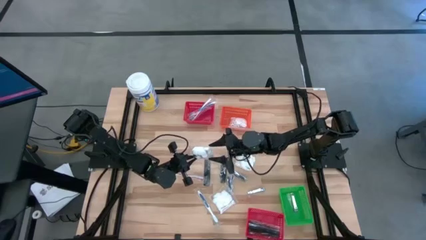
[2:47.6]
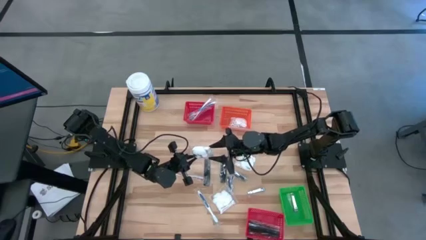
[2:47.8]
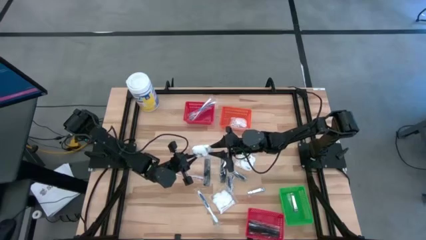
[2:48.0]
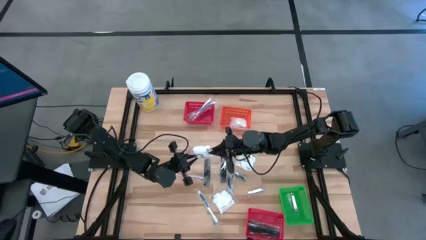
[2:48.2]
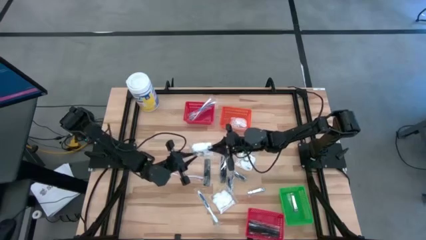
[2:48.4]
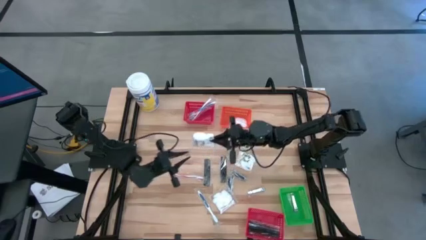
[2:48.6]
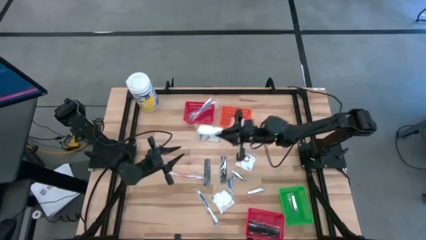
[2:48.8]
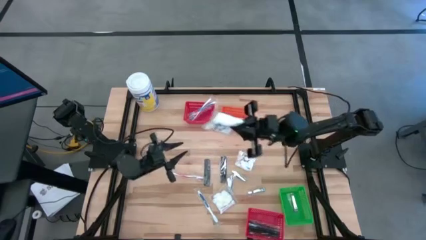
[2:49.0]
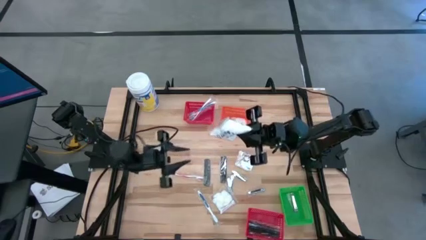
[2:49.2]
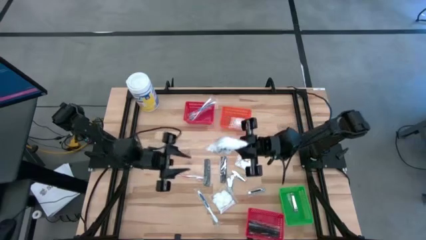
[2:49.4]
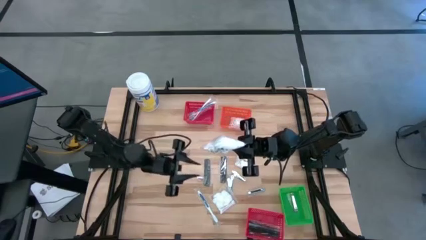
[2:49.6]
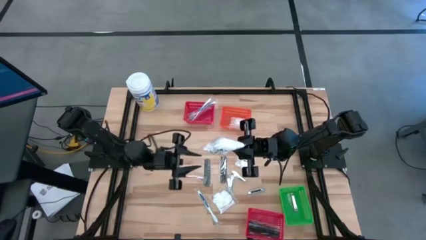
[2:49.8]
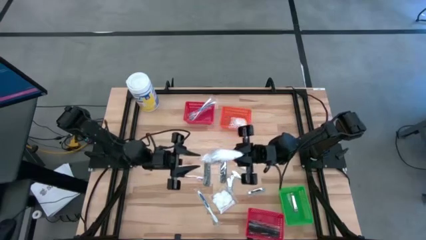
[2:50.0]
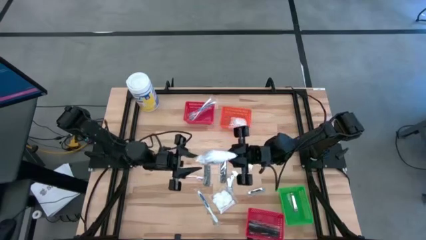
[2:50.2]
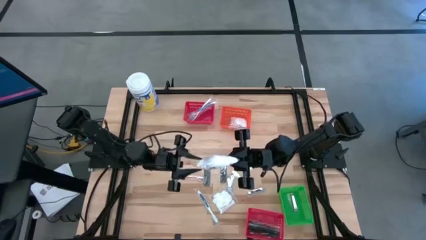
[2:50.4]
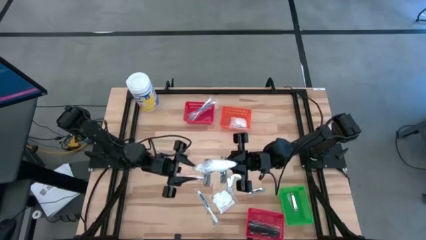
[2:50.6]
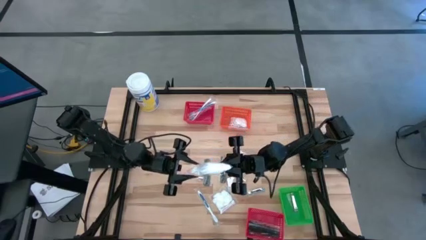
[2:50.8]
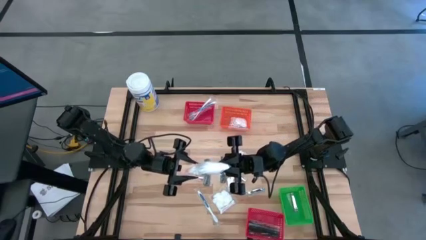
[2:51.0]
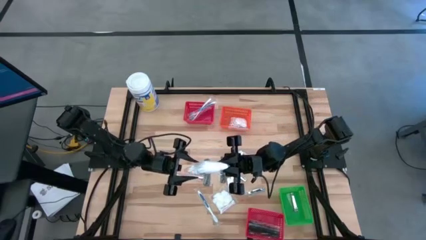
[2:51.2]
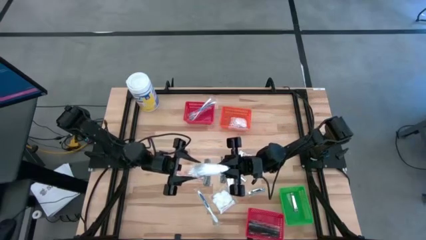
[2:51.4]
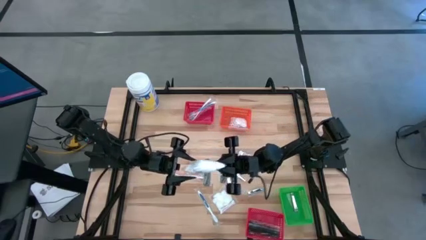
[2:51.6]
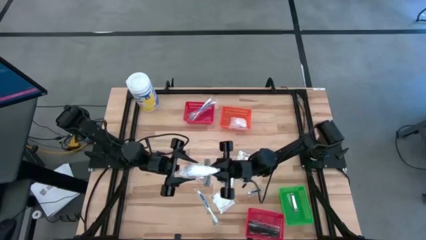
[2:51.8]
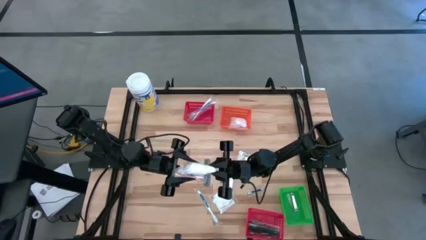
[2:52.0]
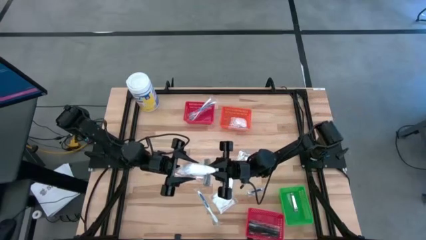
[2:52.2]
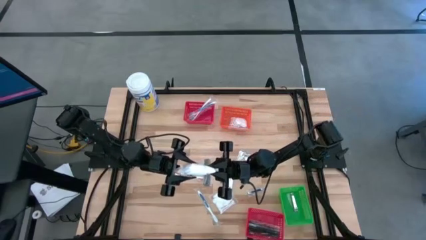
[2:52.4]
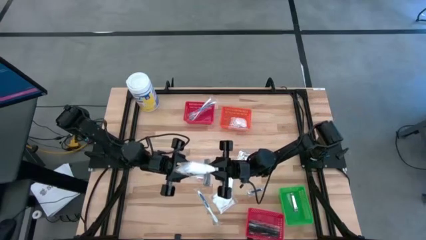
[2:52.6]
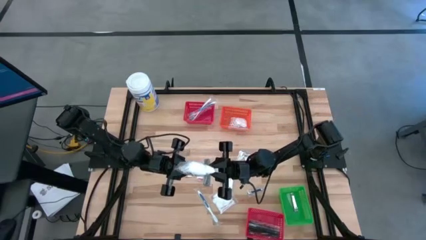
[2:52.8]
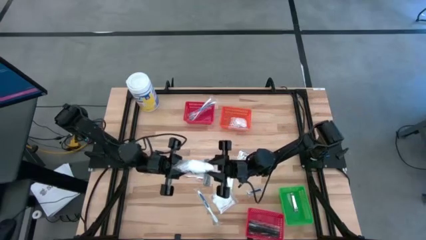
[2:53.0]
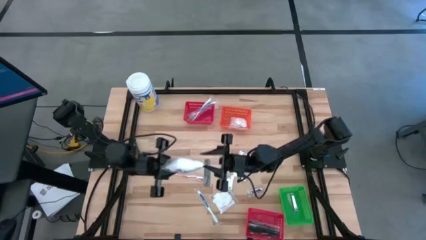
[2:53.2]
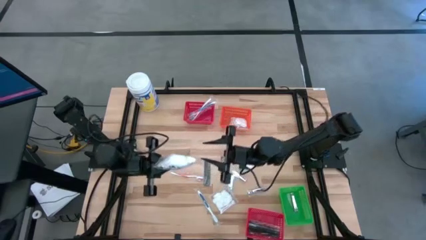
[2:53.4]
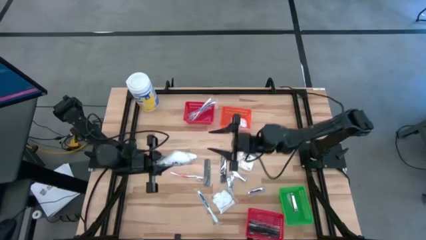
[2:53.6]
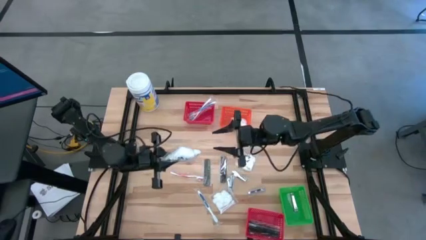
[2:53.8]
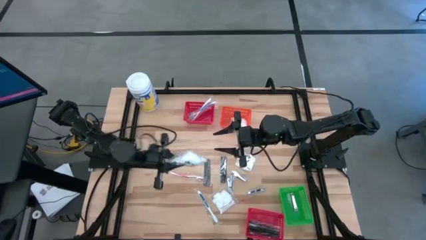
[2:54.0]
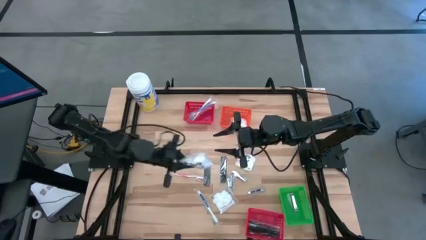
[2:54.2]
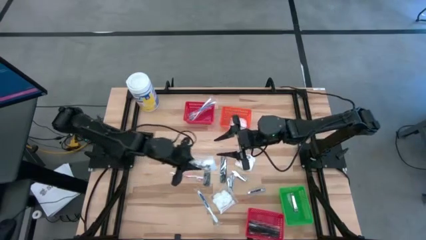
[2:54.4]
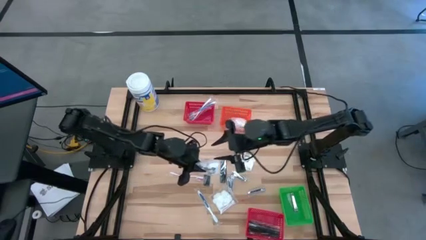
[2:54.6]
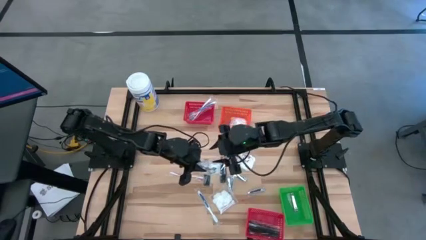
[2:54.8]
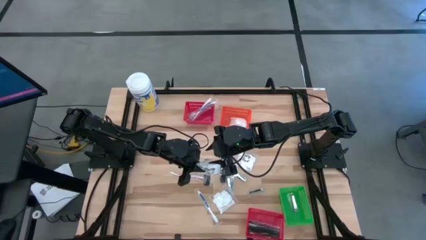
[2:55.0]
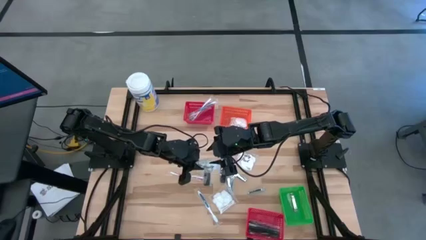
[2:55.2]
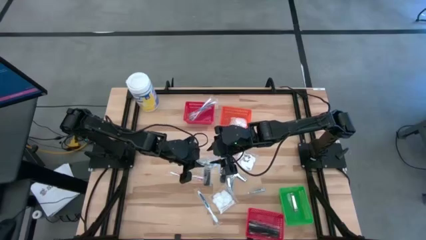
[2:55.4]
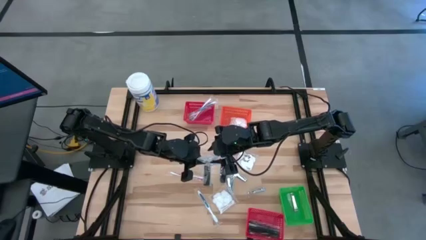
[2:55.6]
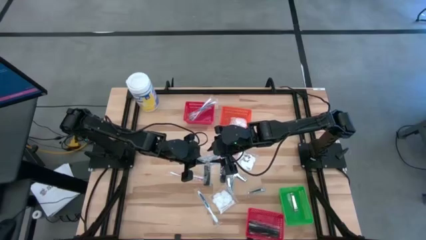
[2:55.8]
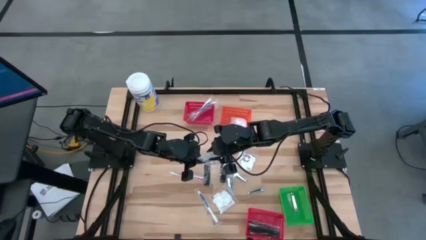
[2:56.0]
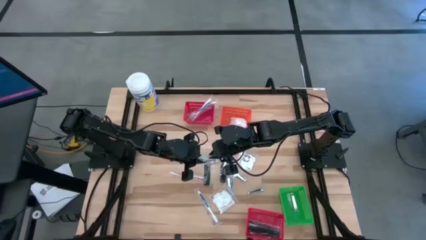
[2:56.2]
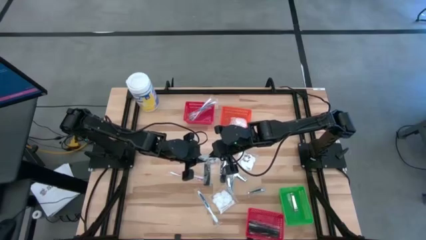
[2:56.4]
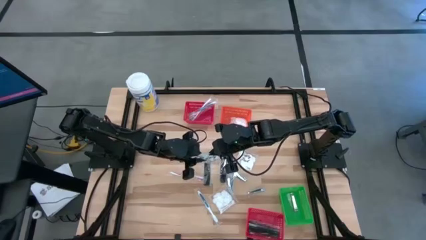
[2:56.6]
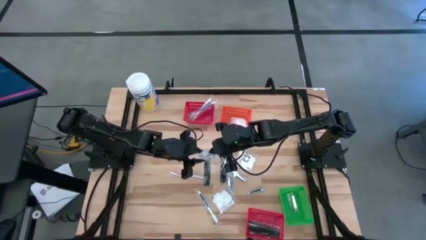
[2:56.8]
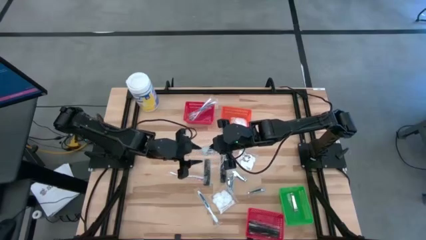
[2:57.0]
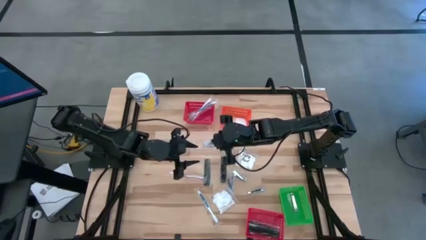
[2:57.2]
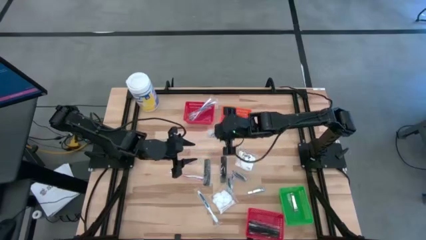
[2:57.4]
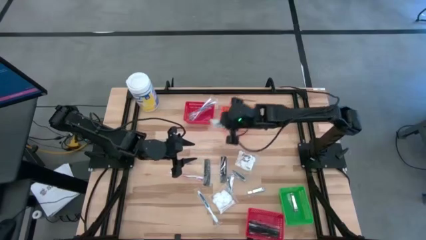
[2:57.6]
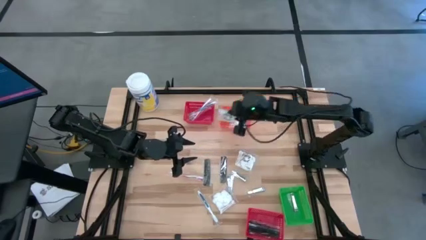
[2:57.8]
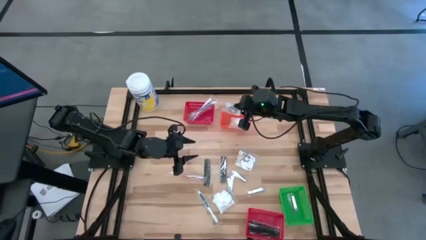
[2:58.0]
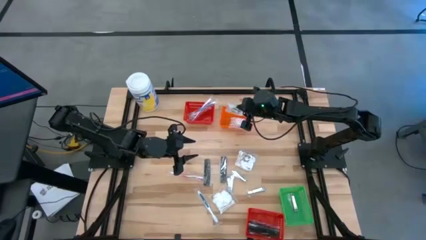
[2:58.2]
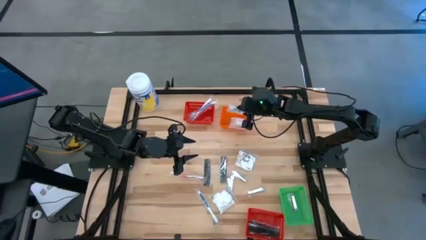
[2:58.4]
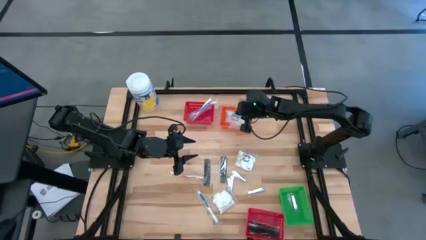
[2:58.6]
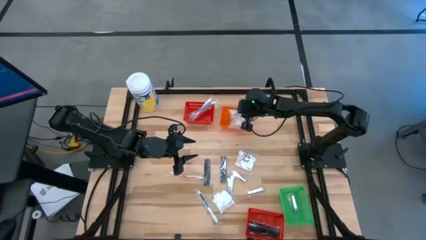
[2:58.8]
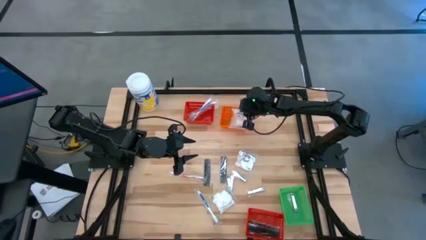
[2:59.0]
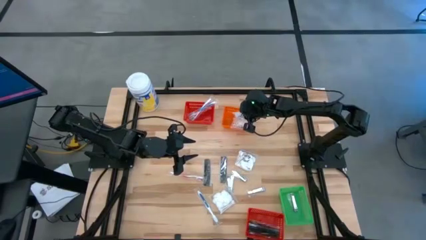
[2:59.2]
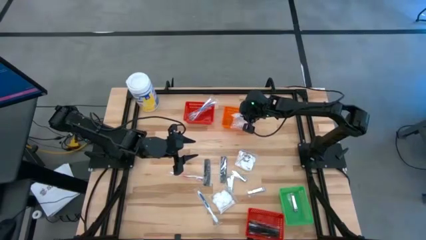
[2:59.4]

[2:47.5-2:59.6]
Task: Pick & Place Travel size toiletries
Put the white cotton pack into the orange bin

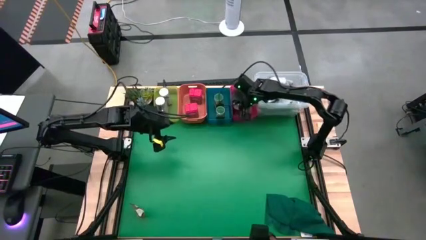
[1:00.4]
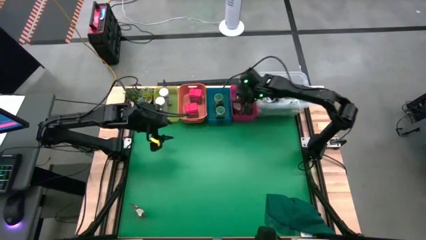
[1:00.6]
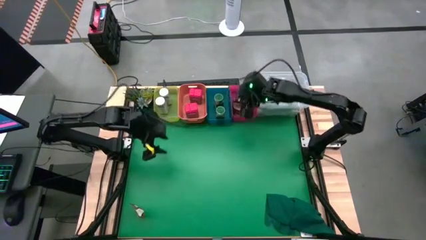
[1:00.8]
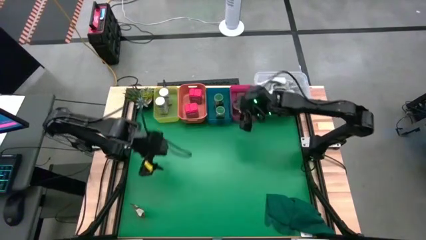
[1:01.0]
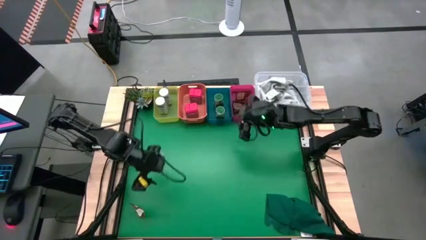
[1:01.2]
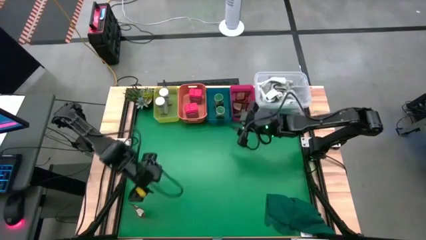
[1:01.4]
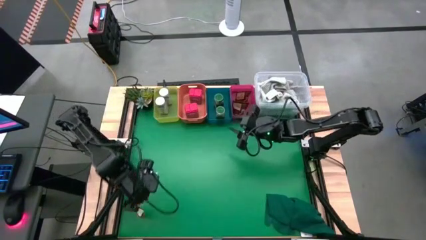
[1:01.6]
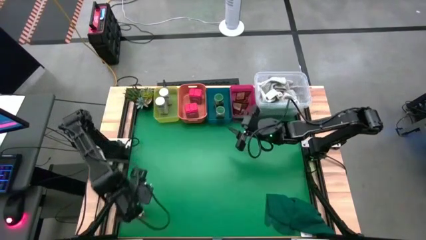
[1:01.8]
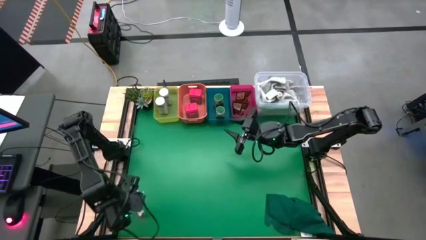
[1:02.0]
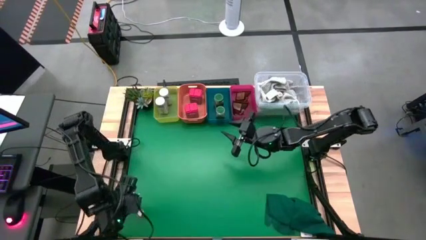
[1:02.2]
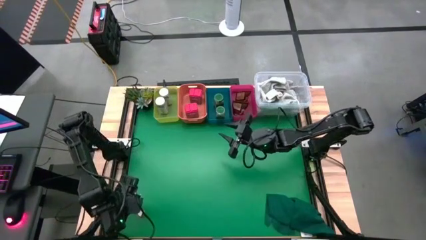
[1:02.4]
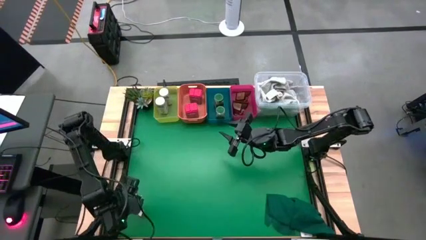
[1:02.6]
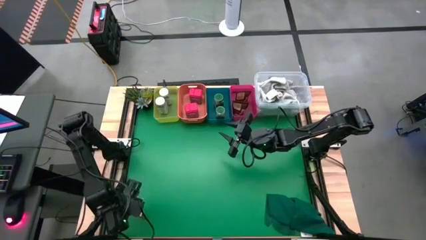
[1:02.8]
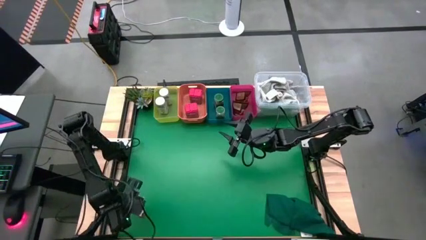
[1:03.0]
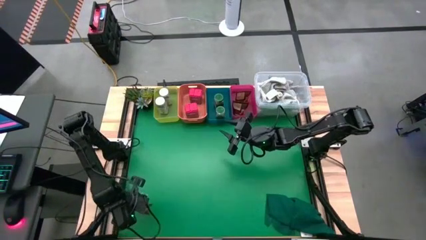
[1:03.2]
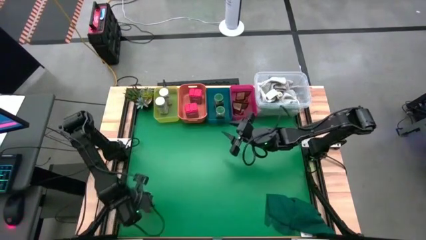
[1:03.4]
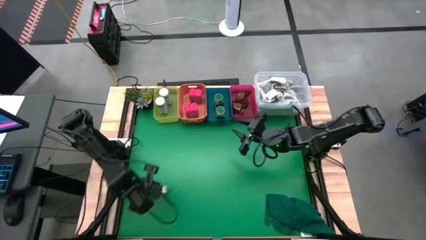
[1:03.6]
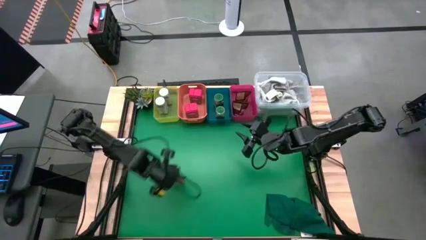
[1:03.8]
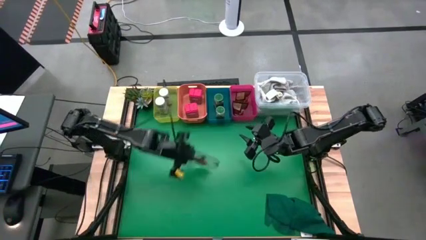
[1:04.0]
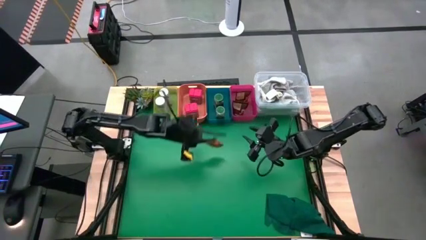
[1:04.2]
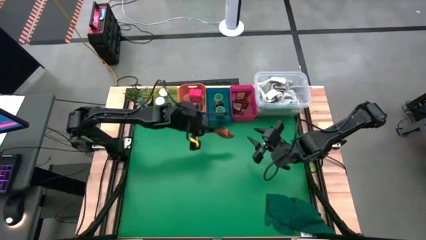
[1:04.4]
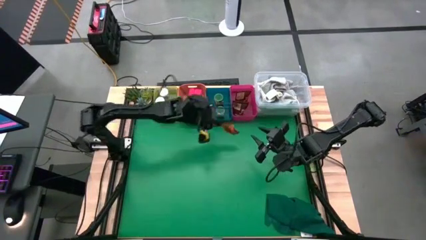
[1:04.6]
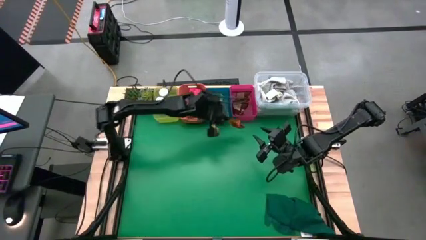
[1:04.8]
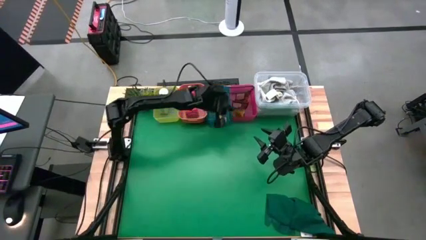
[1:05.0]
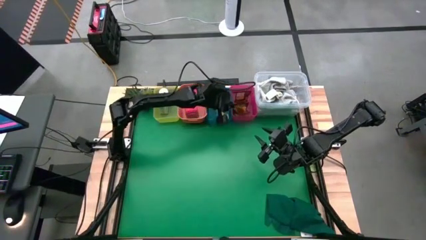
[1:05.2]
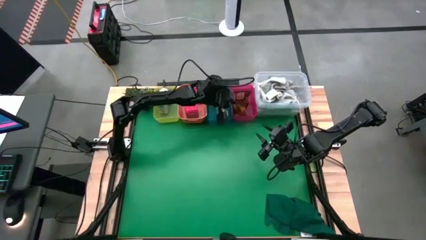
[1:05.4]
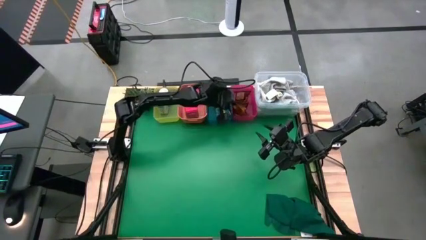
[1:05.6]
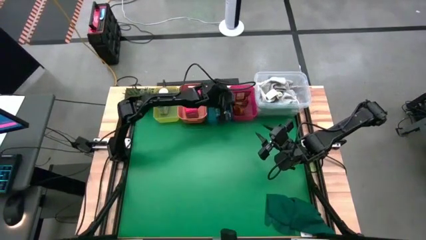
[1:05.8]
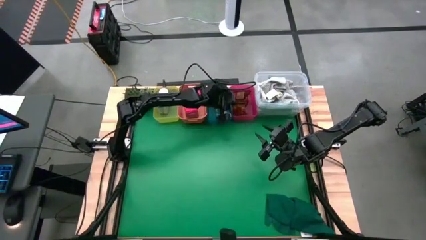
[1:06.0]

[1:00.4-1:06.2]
Task: Sort spices by type
Put the brown seasoning bag into the red bin
